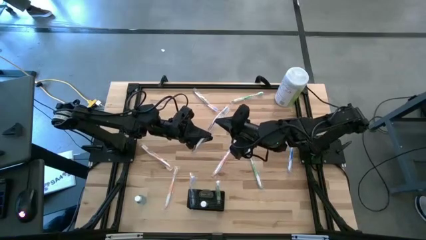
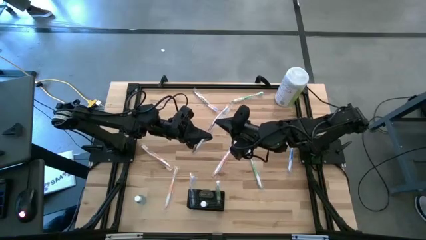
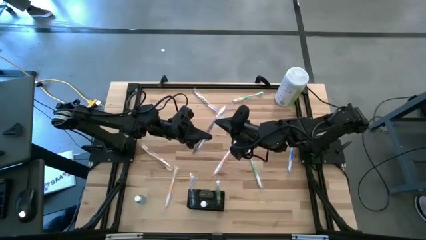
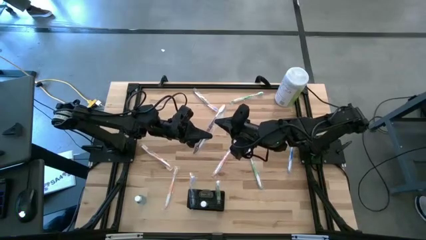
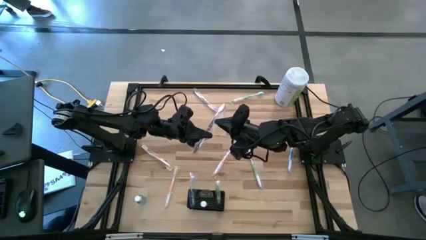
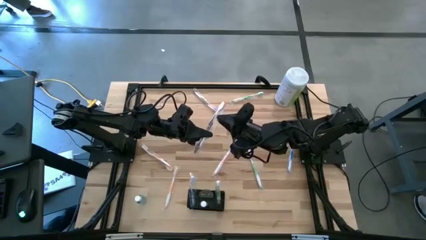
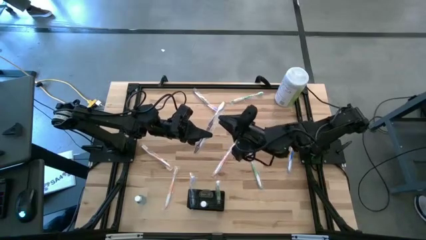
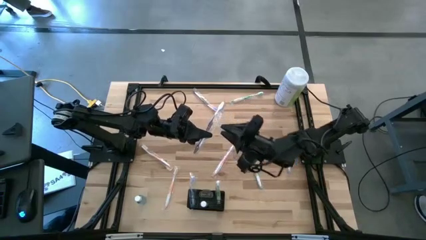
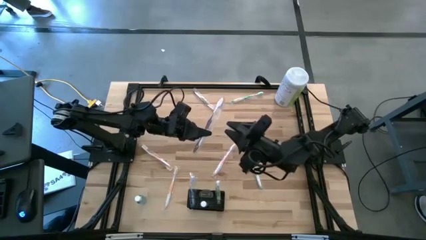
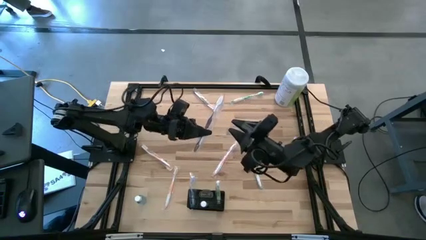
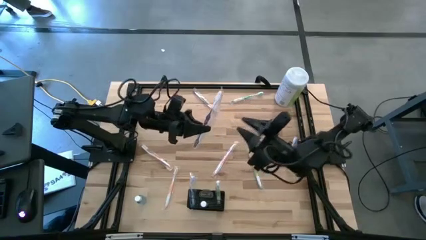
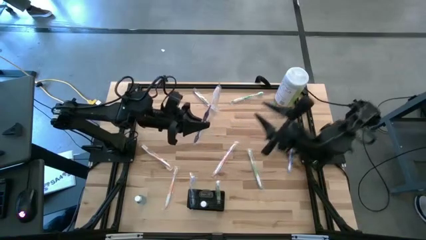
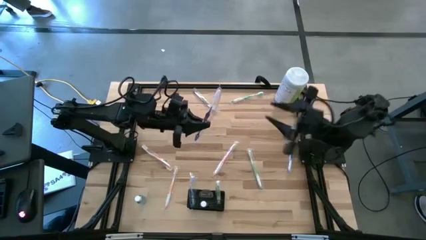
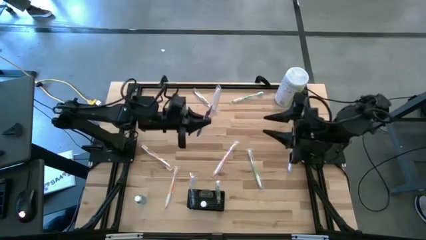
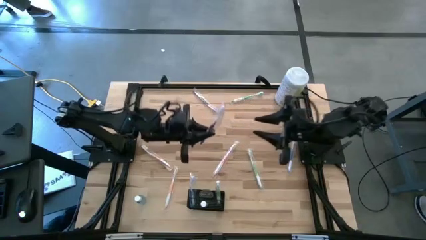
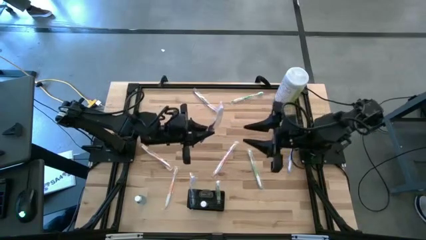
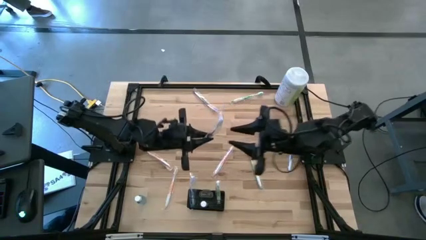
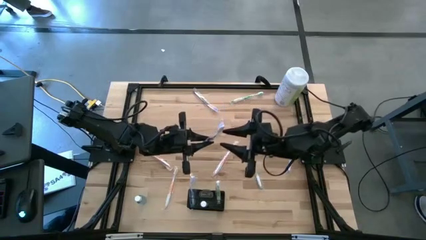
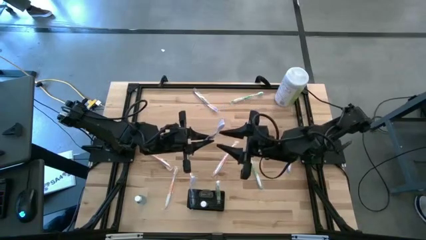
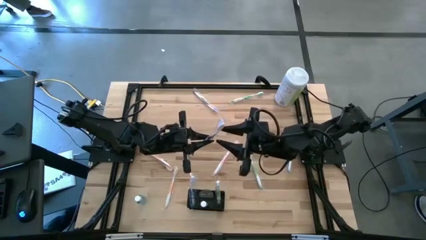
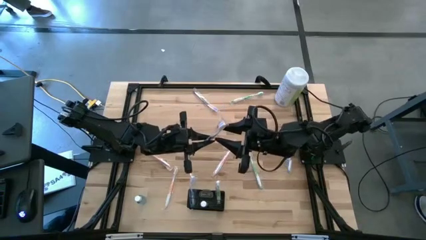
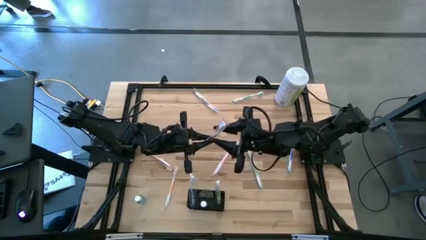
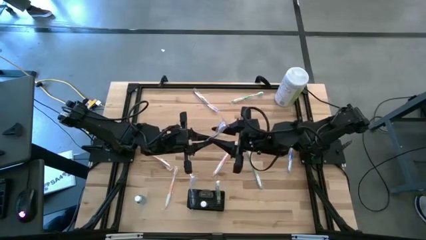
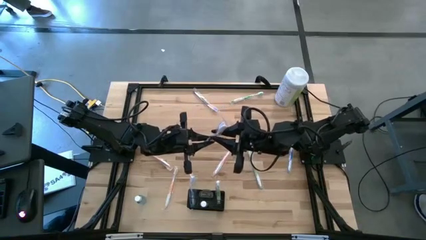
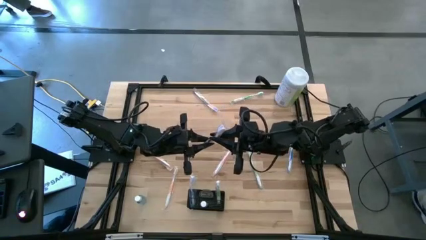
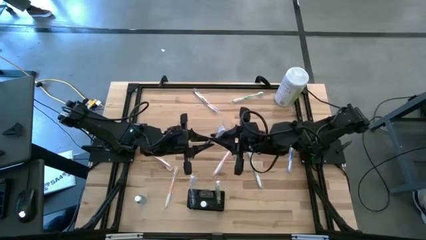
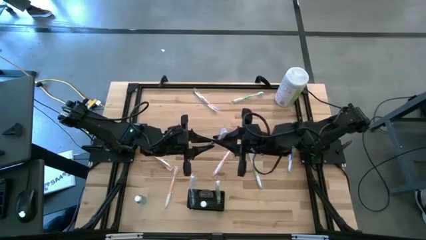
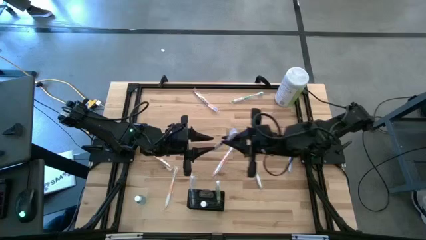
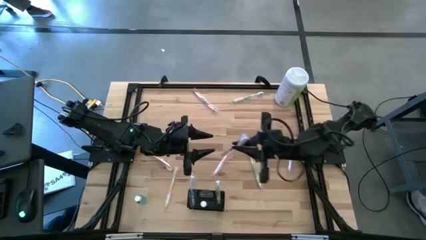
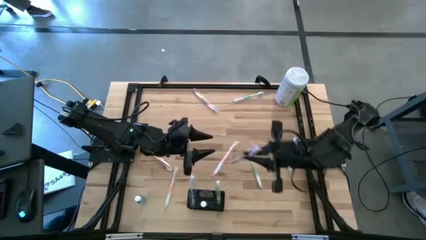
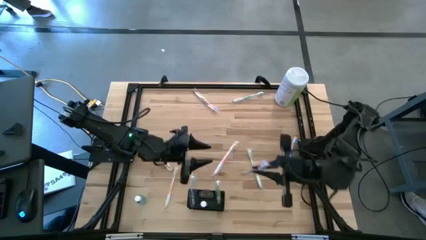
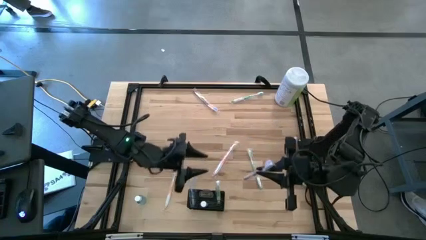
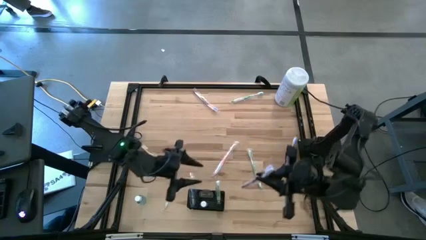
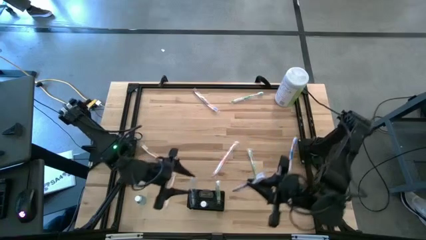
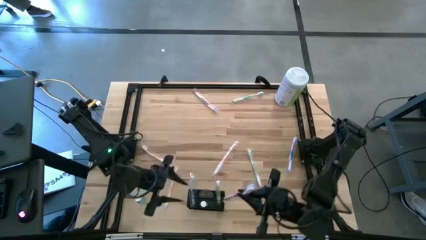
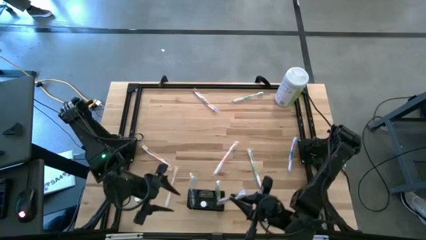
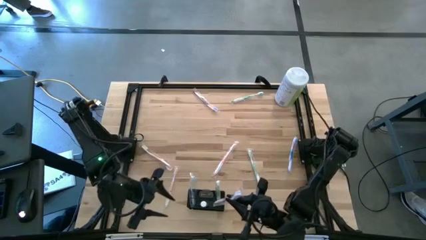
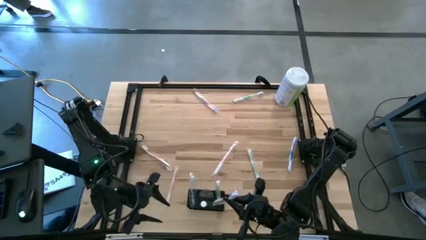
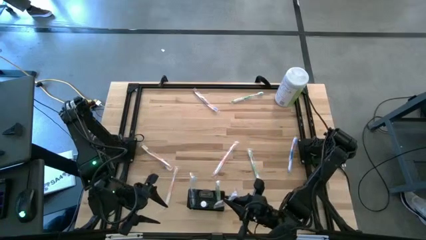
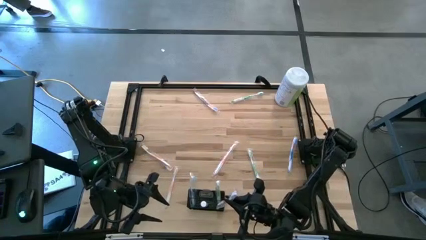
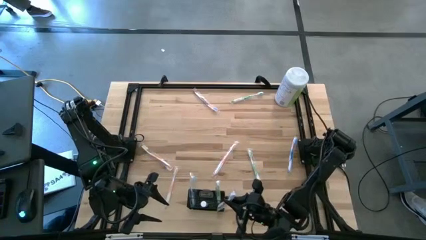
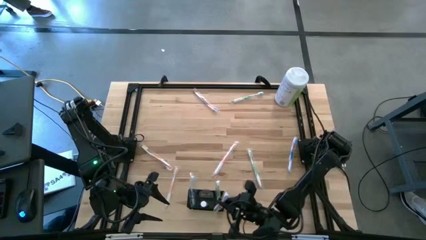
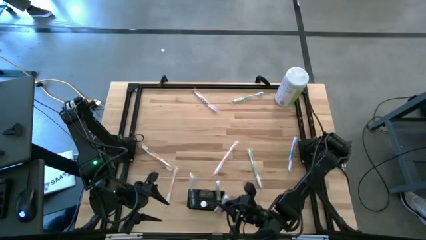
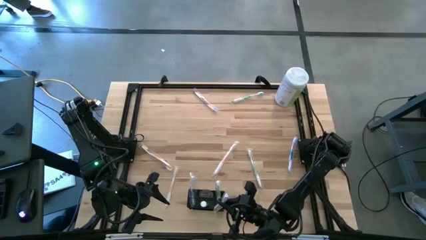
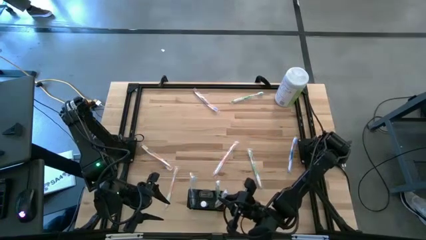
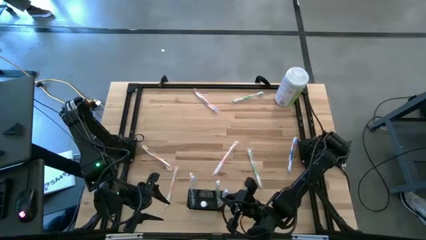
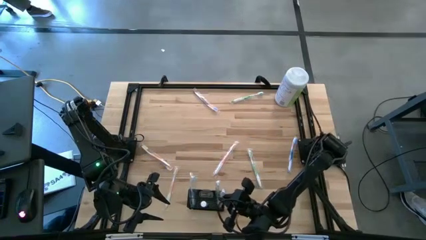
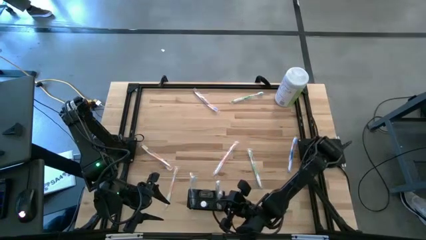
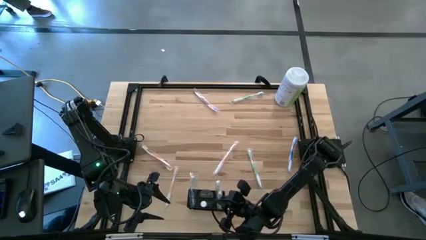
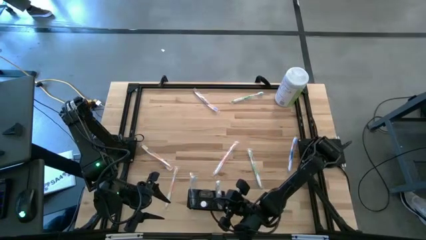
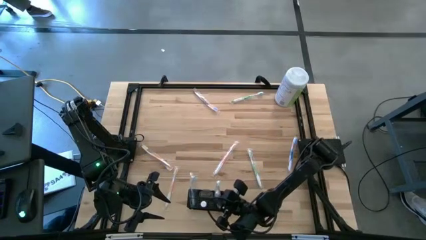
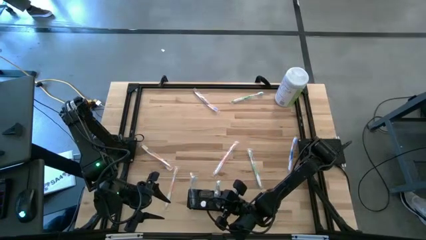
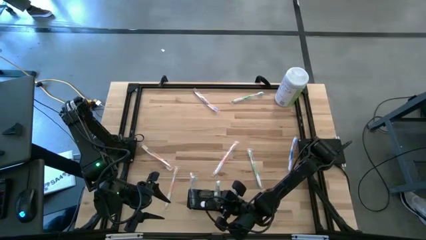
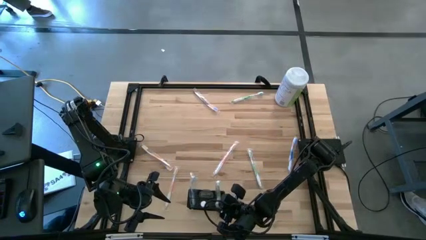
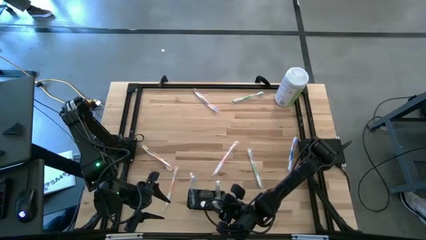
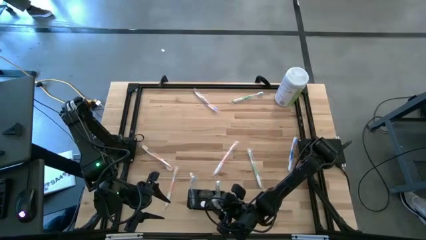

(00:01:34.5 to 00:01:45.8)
Task: Pick & Place toothbrushing station
Put the bottom purple toothbrush into the black wire organizer

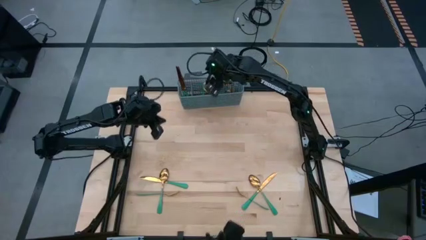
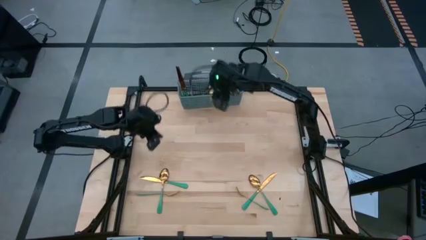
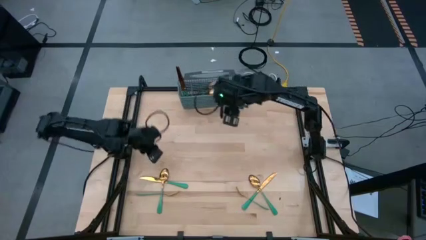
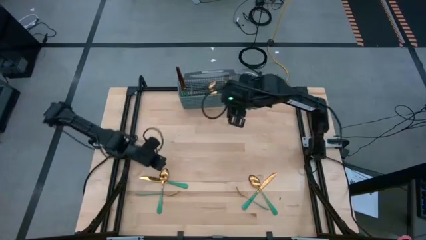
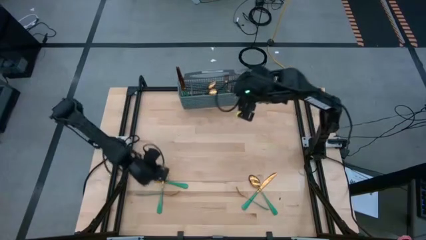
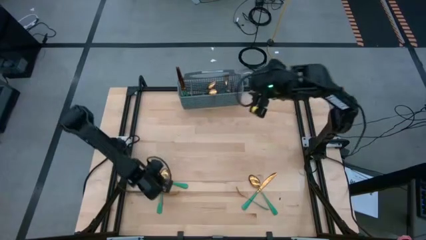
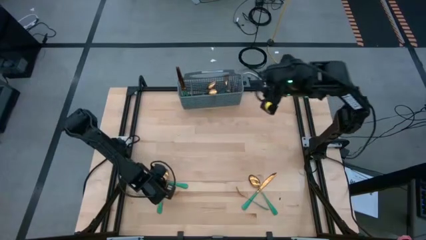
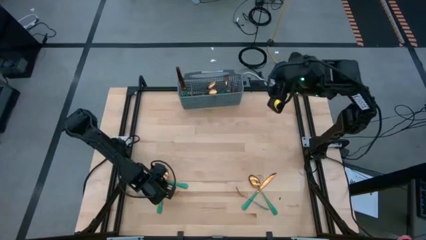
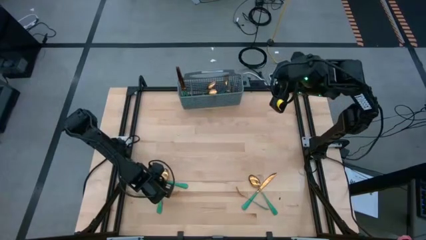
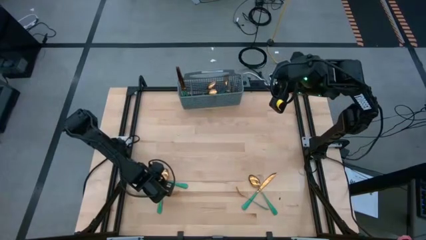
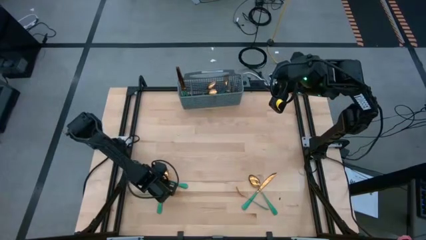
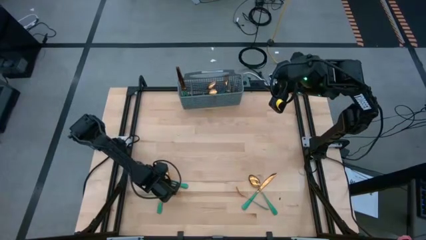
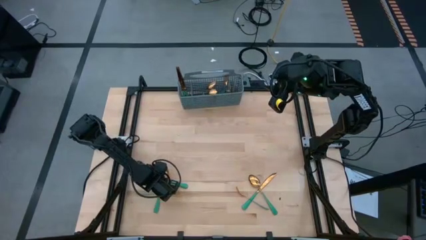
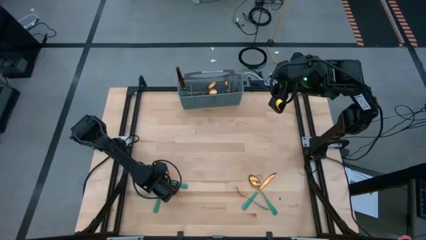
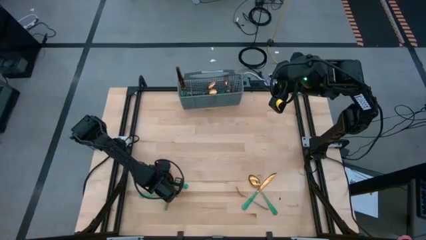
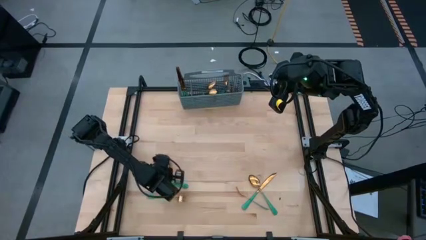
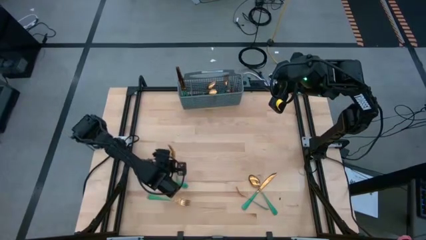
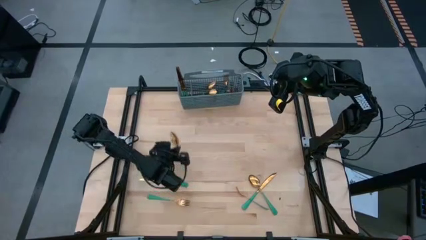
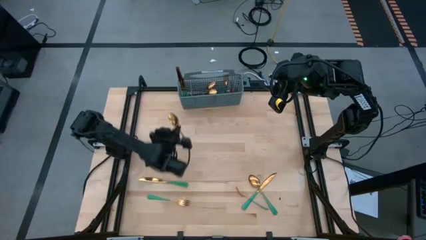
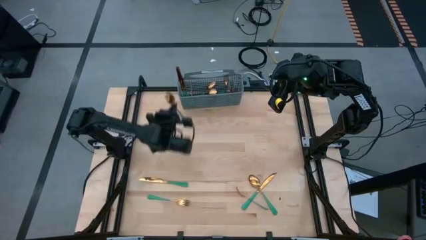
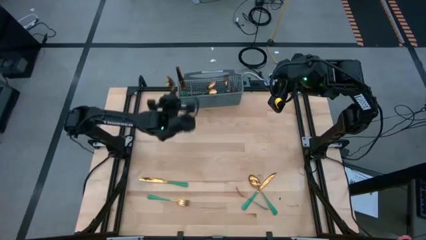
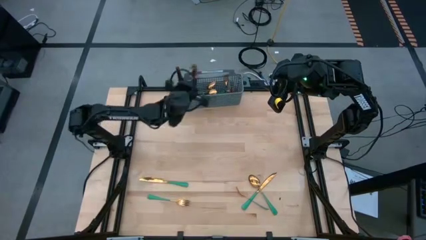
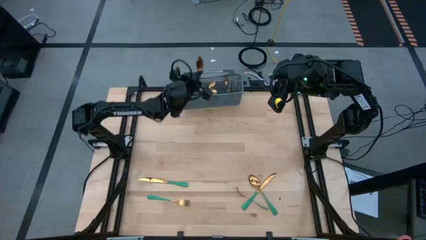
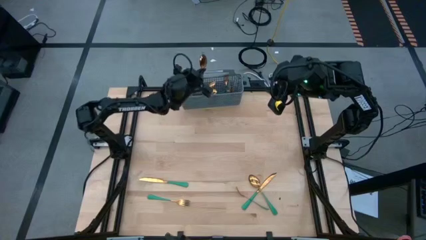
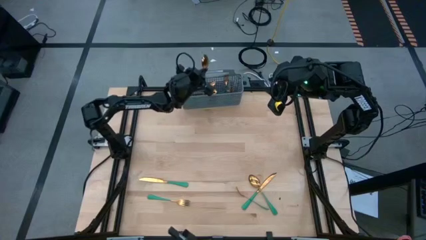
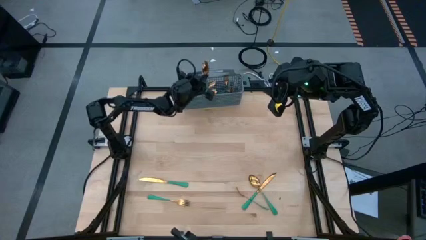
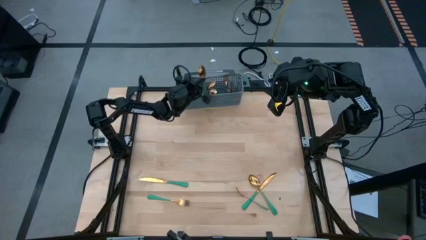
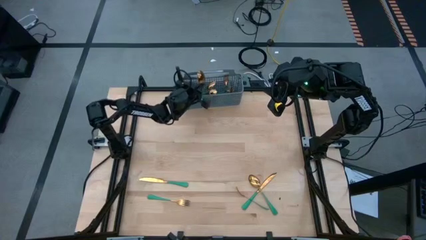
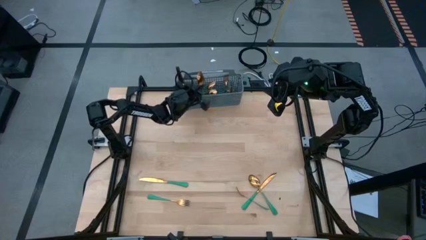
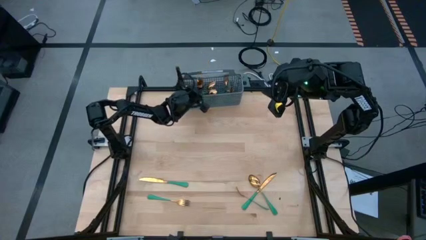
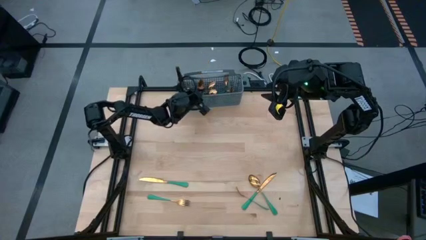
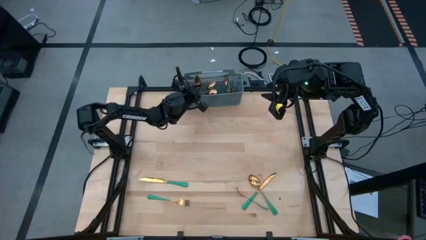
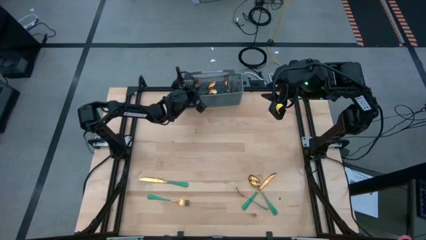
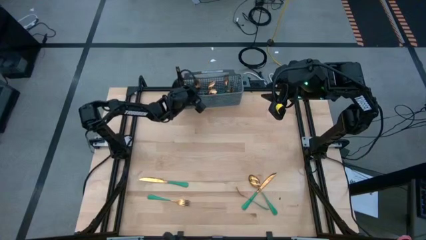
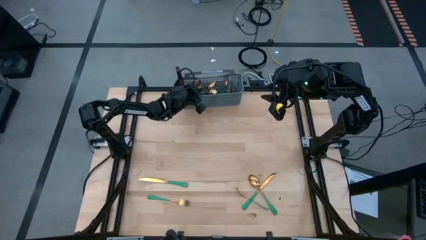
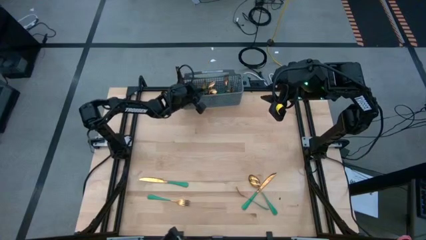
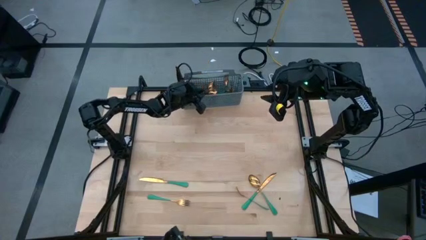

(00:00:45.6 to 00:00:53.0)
Task: Sort silverware
Put the green spoon into the gray bin
